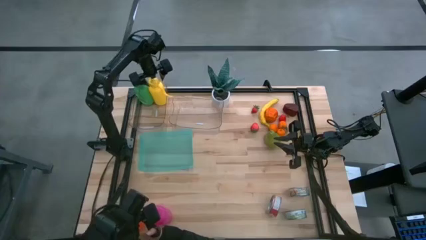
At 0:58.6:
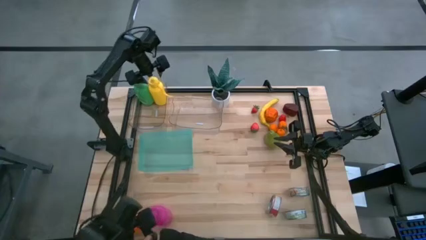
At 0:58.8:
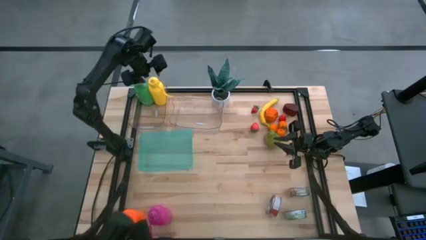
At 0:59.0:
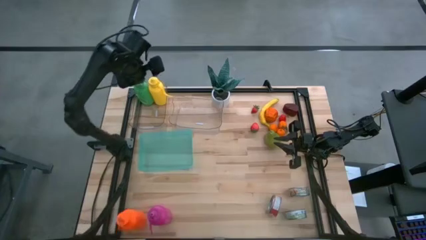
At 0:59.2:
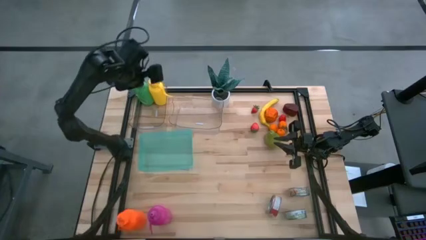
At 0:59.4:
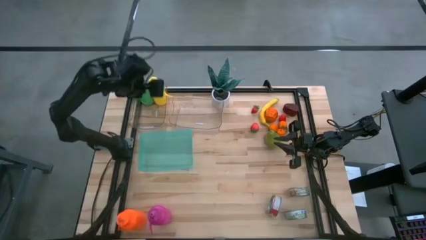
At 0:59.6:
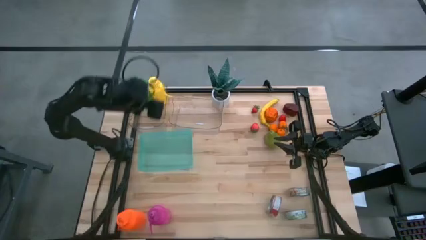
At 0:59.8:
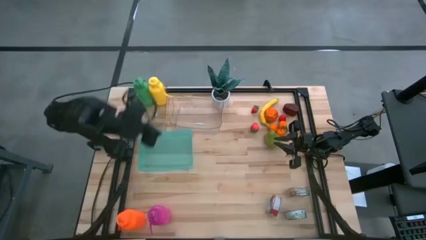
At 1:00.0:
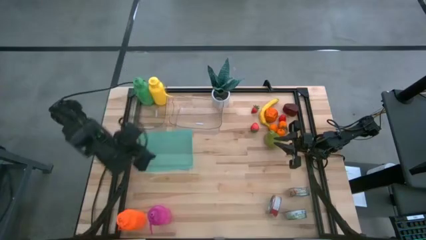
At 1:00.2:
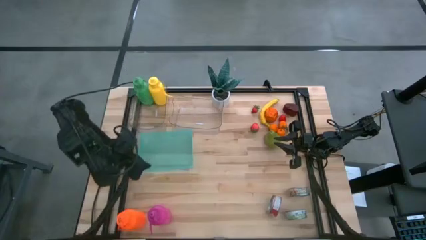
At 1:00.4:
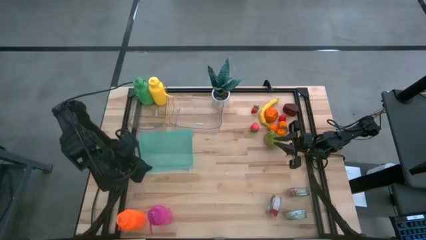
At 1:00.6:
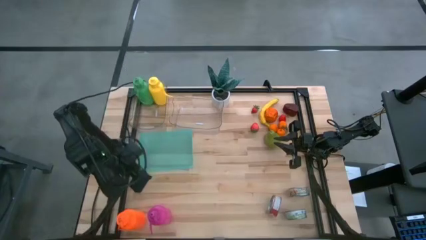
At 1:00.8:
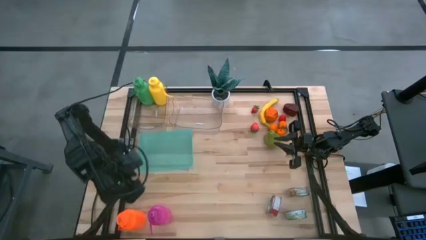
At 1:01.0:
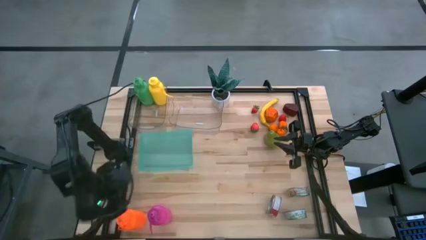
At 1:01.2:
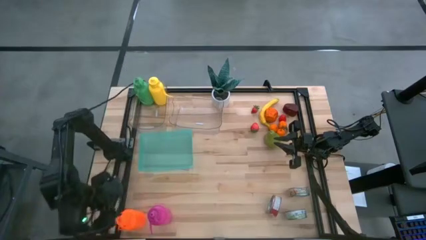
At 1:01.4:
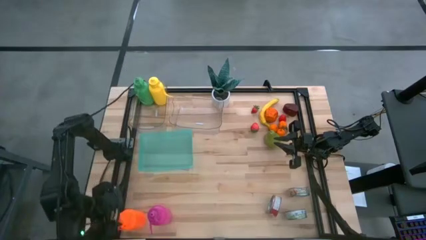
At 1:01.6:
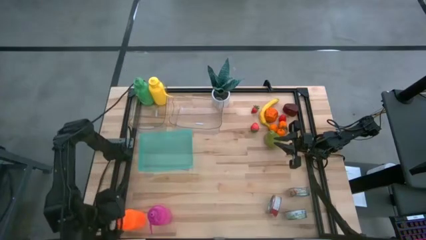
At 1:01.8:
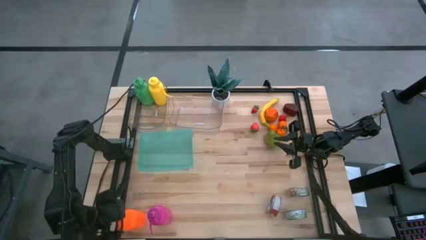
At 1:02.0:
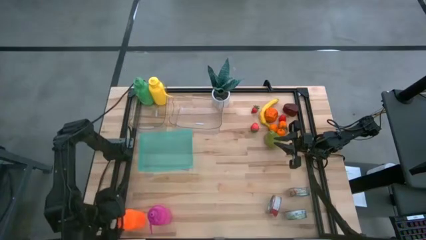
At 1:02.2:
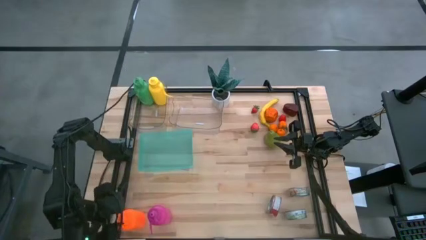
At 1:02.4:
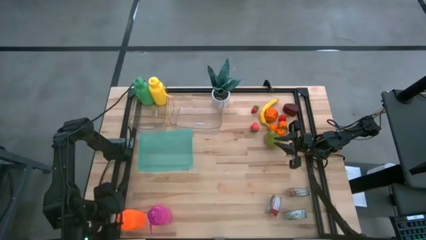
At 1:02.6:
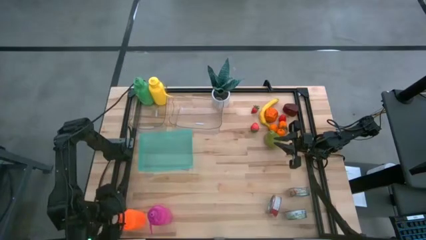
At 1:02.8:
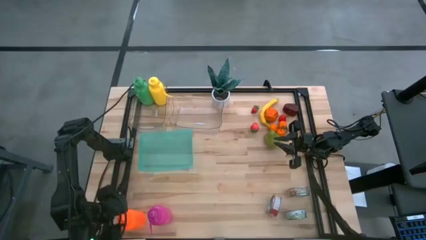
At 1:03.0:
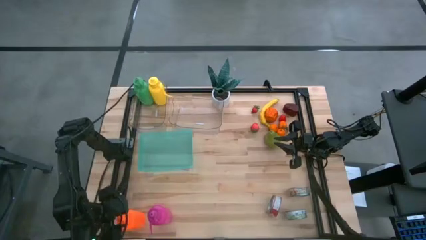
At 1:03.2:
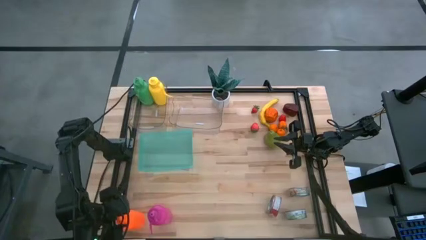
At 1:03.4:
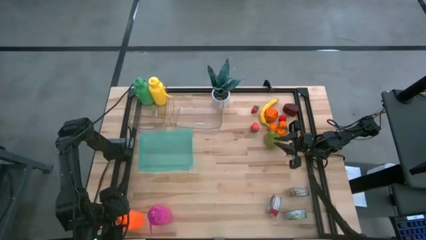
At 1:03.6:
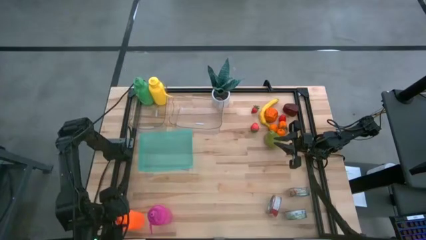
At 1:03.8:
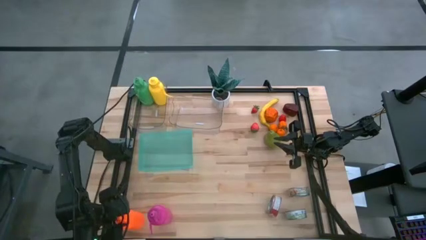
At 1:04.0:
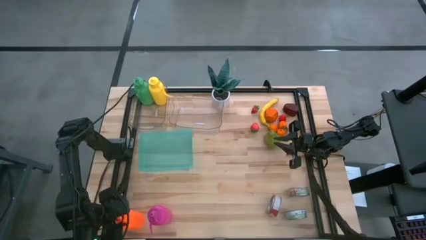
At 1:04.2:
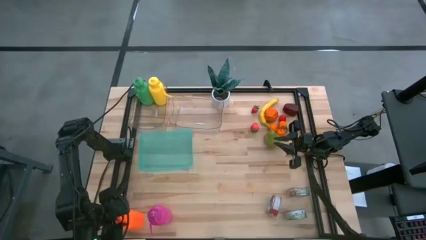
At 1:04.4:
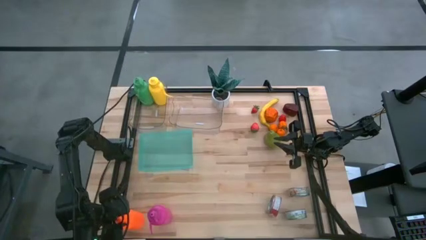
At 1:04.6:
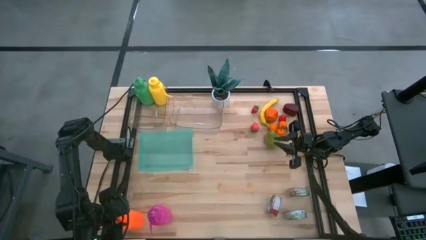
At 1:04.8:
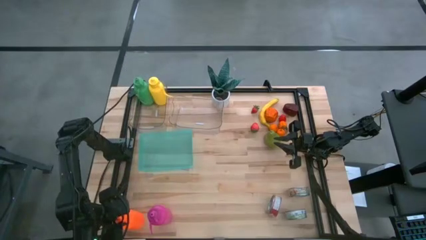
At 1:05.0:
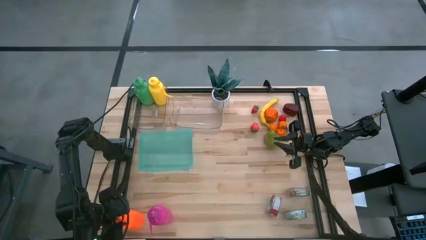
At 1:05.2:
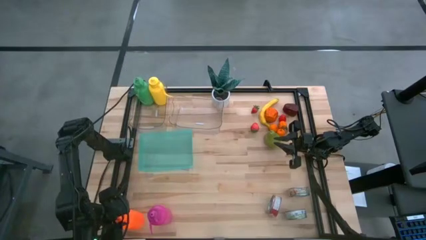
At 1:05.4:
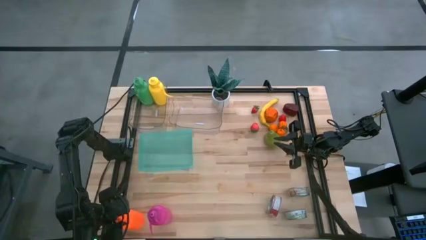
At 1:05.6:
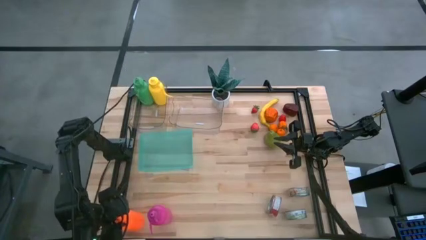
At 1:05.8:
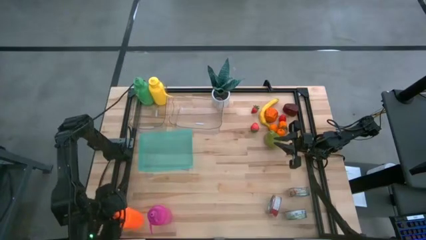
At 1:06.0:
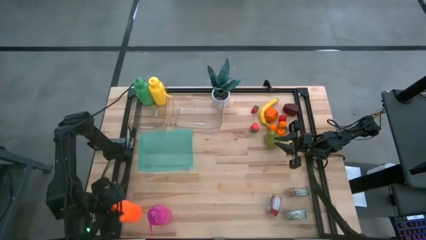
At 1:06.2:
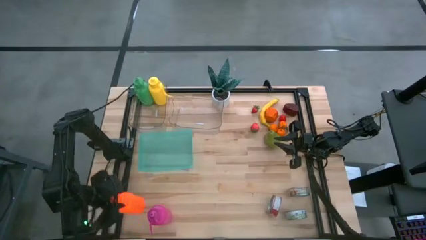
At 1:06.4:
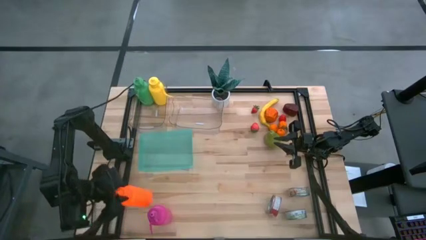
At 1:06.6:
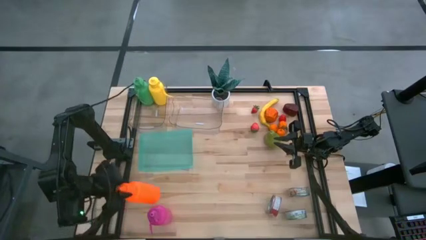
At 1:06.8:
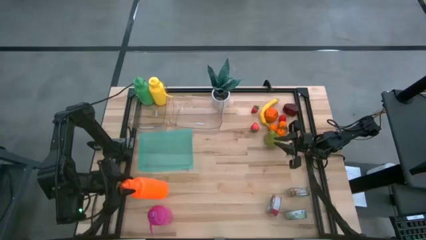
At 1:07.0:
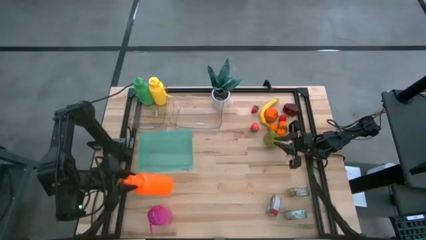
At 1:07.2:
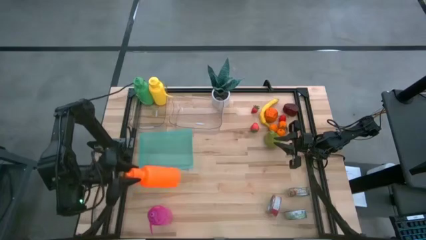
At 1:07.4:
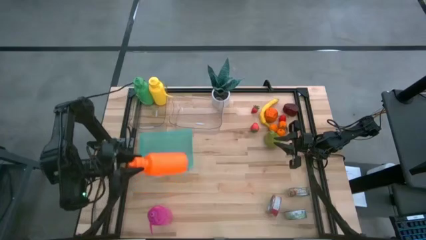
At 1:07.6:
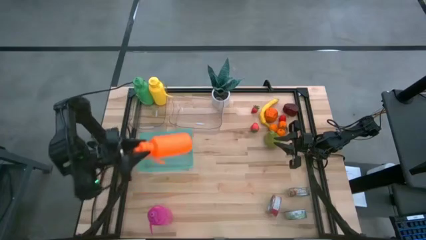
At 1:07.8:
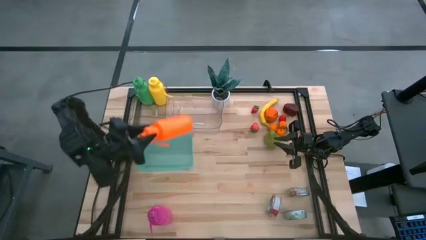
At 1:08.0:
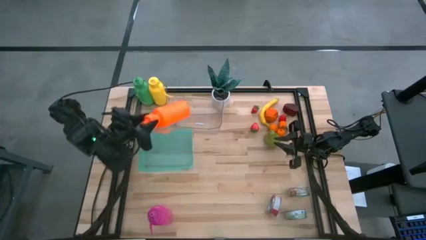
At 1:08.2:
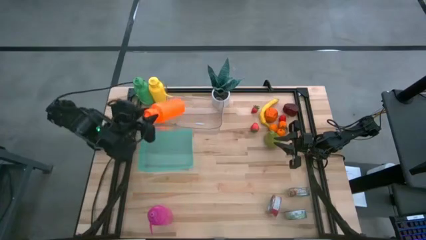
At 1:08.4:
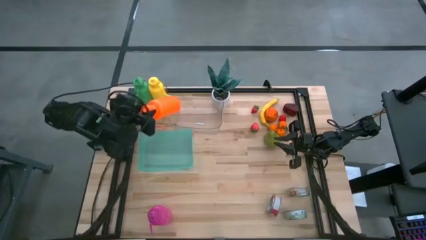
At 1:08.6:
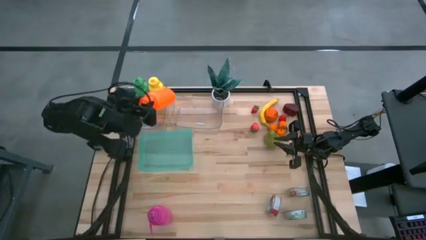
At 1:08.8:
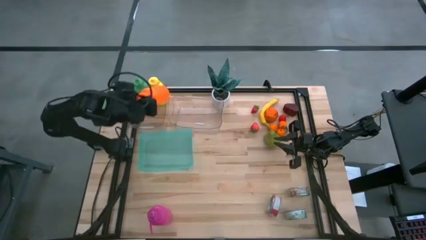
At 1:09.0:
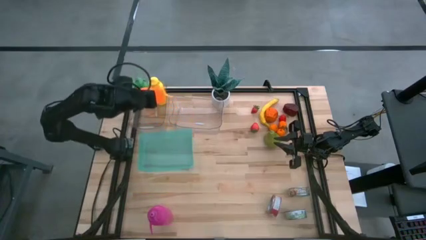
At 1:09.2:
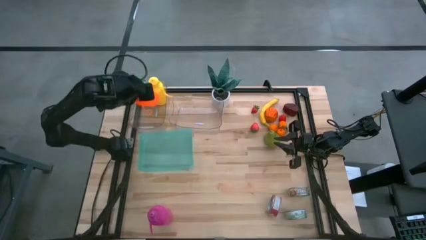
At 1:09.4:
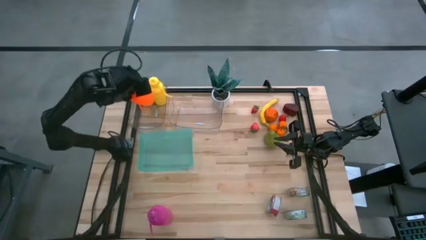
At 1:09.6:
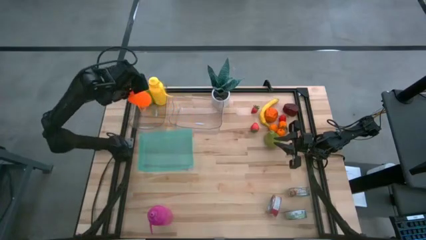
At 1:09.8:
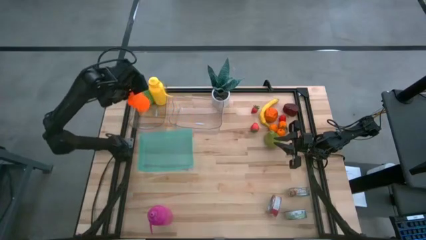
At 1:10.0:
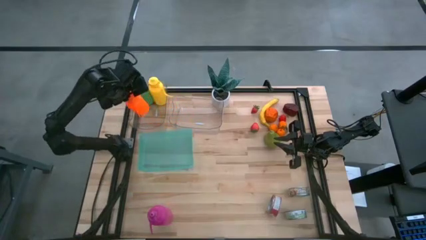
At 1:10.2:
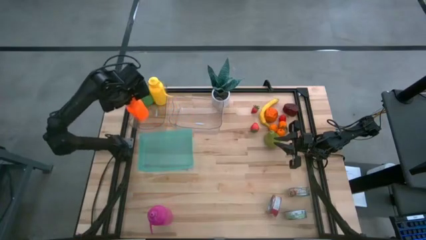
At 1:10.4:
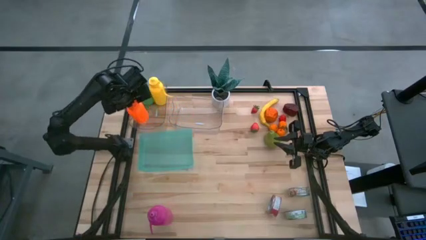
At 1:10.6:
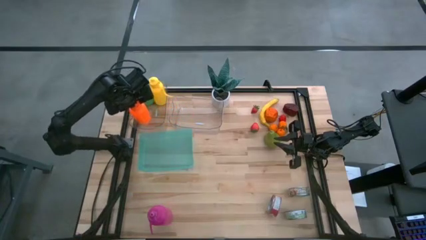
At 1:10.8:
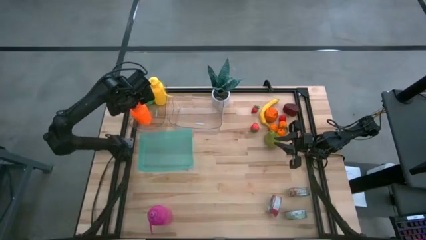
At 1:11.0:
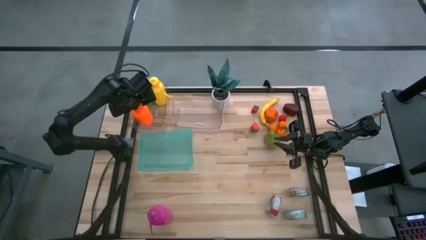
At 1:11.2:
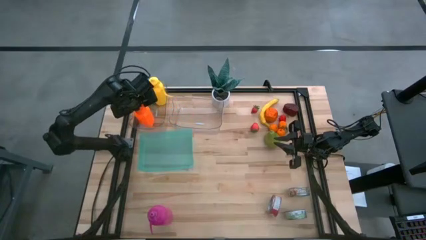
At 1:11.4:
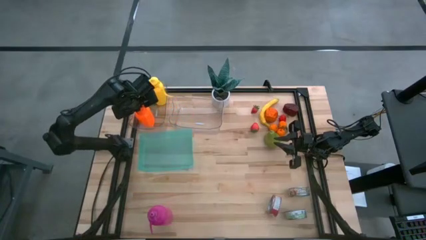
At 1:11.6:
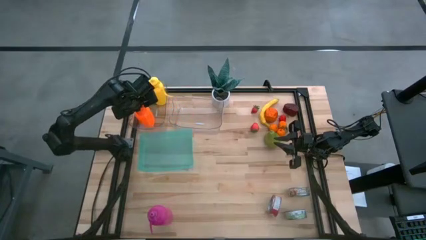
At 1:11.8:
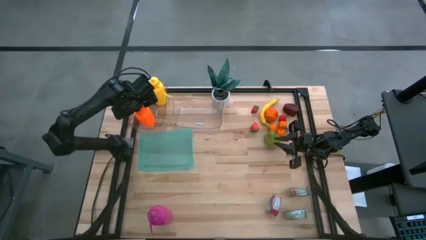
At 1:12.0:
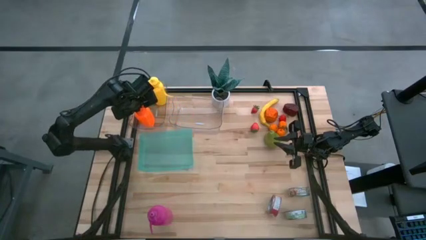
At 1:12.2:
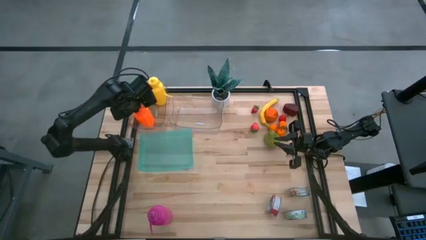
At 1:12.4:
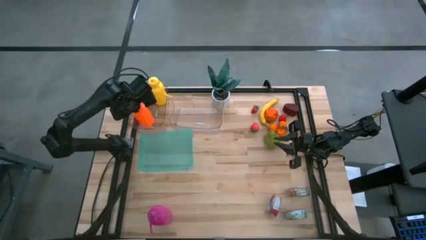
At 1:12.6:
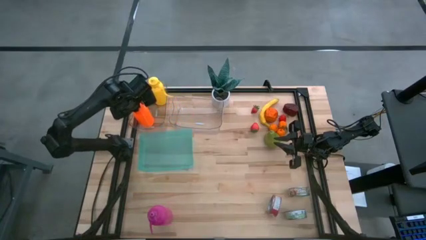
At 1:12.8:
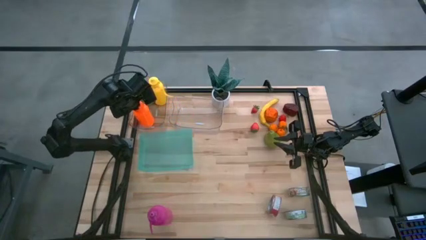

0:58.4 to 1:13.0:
Task: Pick & Place Food Item
Put the orange water bottle into the left transparent bin
